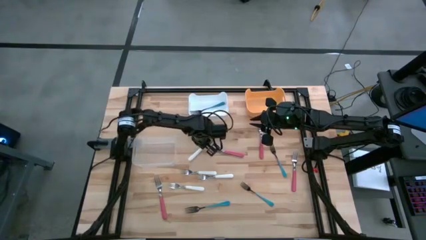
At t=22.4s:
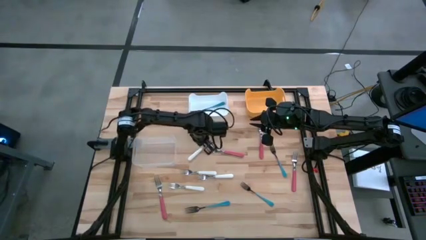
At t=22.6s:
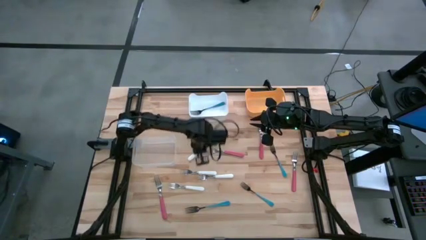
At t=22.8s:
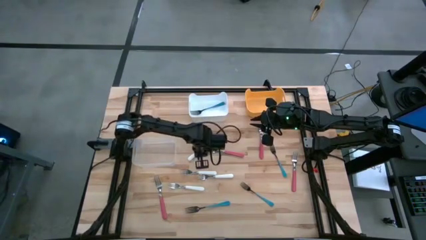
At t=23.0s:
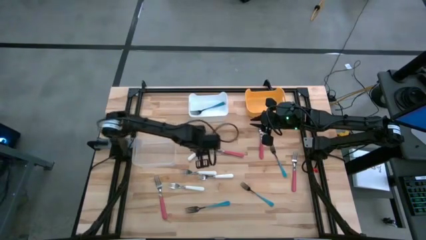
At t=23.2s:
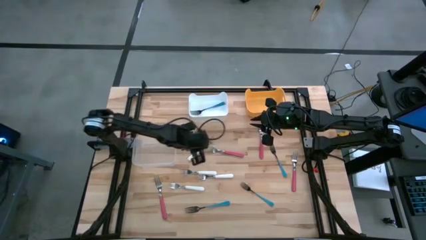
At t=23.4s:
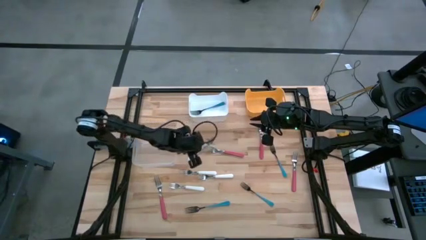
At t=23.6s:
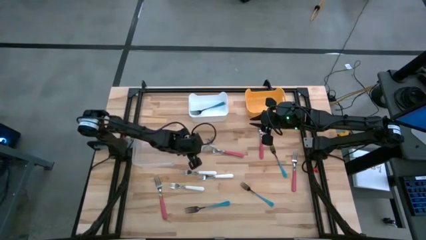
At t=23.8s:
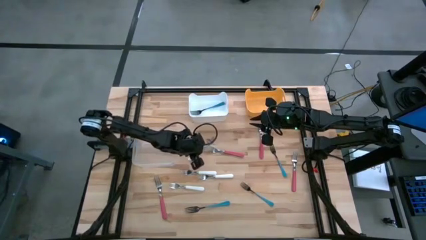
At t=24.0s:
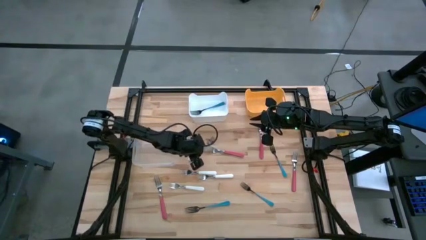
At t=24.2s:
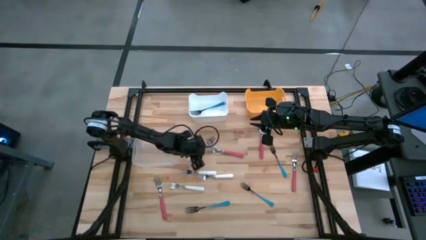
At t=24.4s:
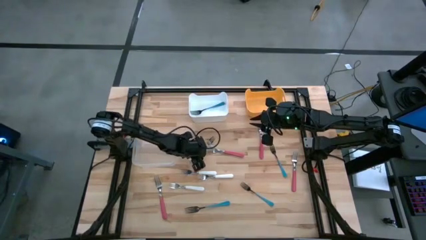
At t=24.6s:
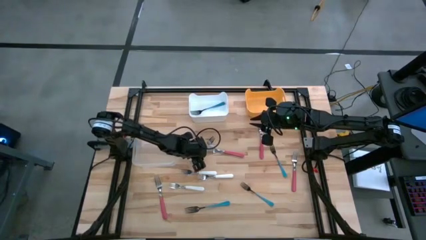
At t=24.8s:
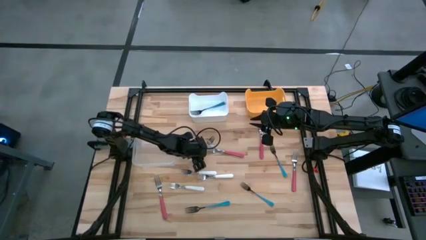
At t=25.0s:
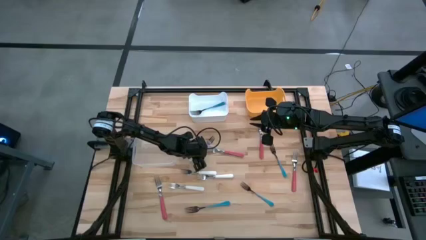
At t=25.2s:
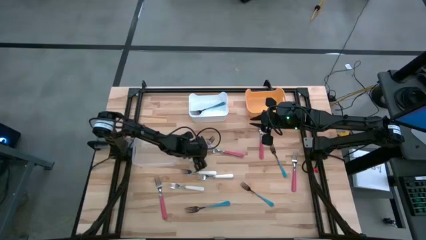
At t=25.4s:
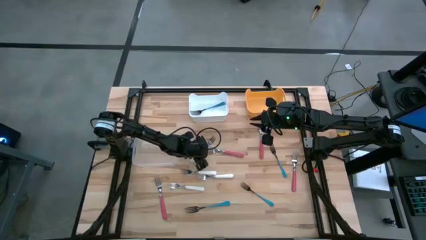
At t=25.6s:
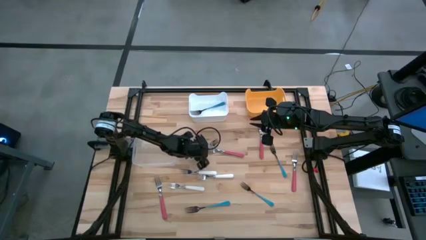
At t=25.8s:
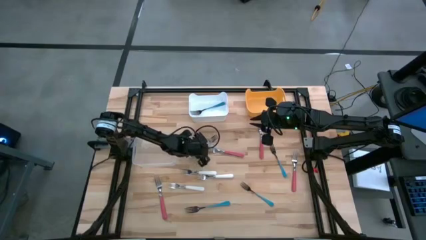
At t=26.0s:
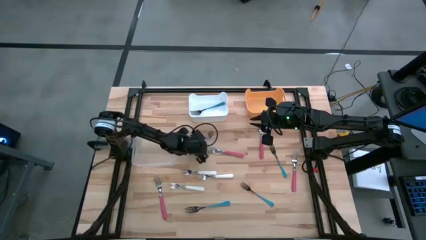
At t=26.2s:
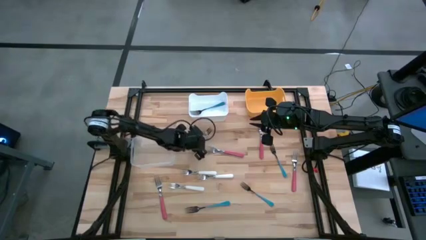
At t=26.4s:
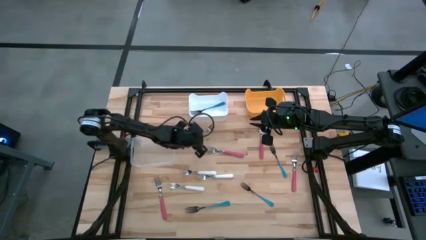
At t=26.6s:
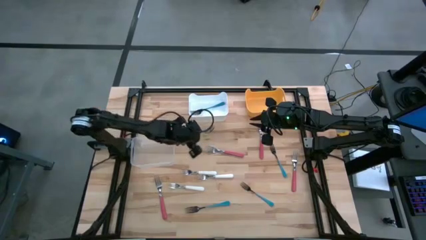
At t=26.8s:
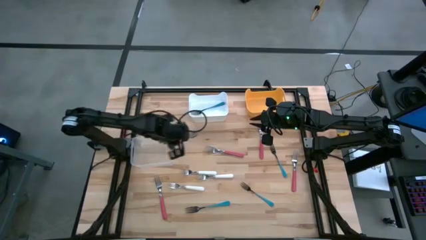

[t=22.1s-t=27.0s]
Task: Sort silverware by color (type)
Put the white fork into the transparent bin

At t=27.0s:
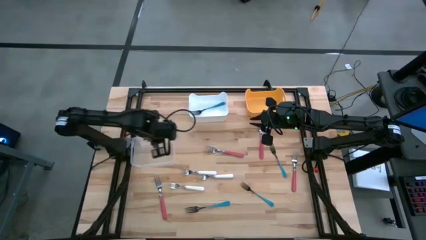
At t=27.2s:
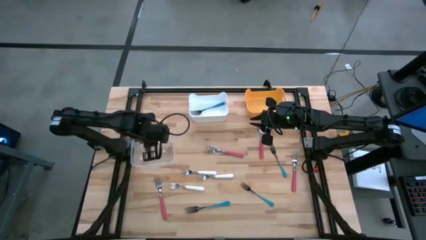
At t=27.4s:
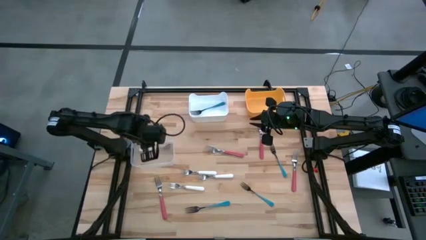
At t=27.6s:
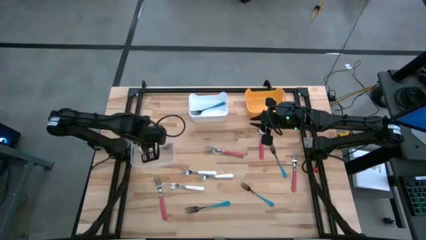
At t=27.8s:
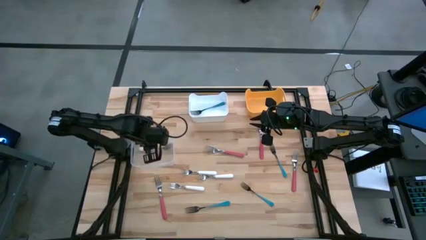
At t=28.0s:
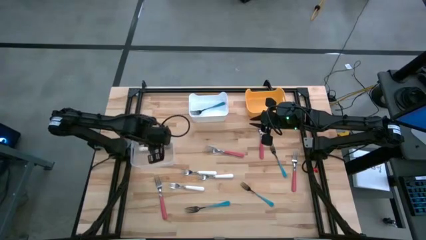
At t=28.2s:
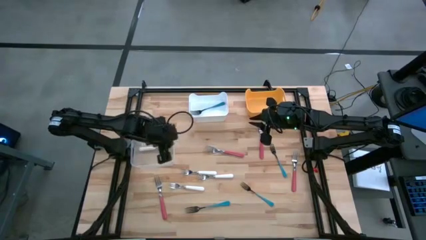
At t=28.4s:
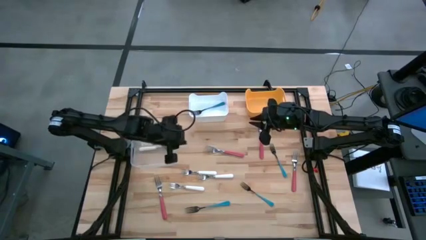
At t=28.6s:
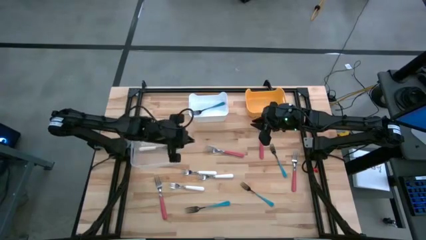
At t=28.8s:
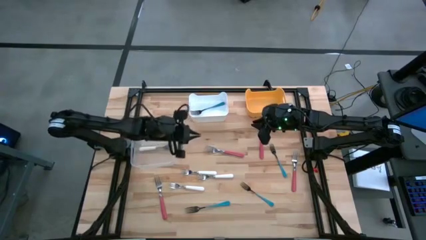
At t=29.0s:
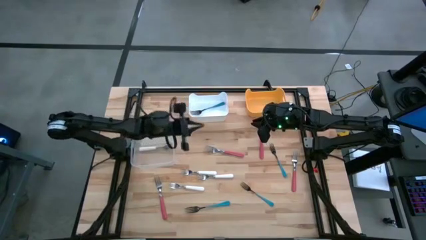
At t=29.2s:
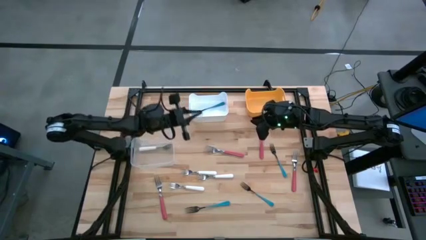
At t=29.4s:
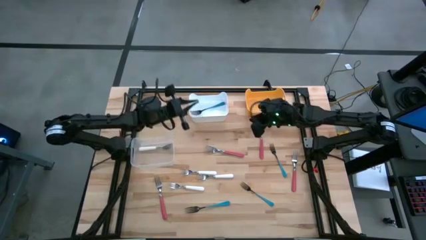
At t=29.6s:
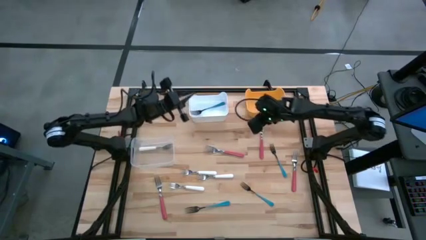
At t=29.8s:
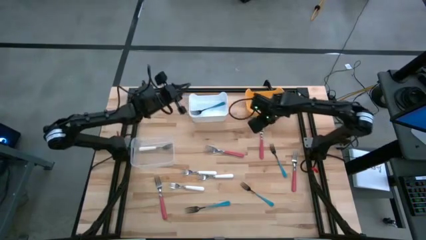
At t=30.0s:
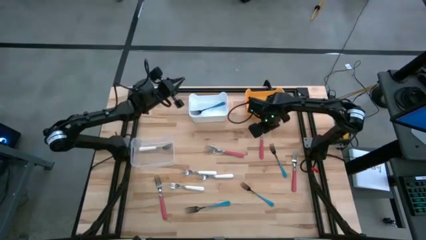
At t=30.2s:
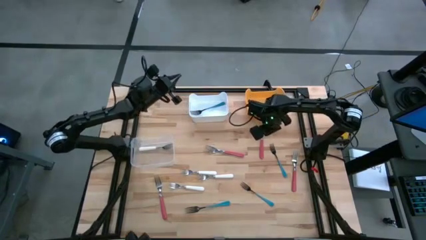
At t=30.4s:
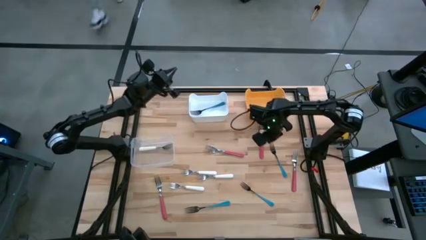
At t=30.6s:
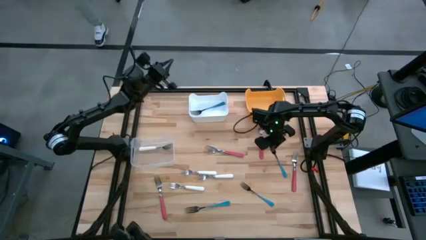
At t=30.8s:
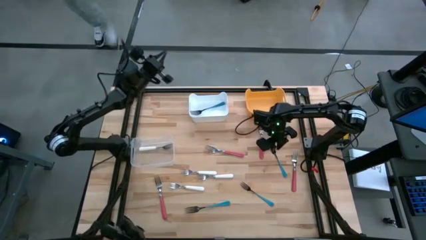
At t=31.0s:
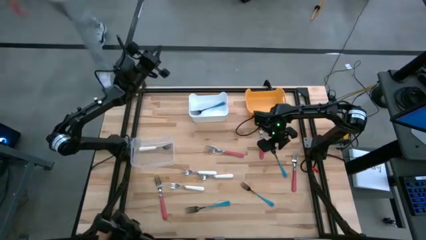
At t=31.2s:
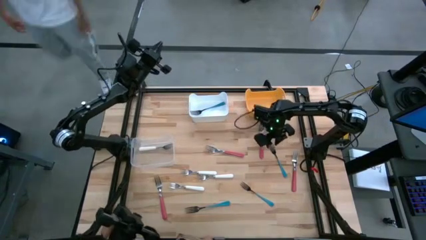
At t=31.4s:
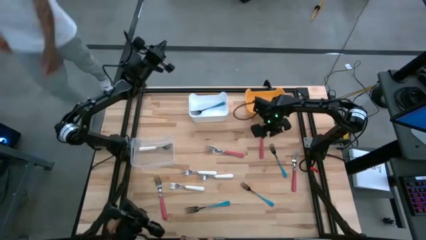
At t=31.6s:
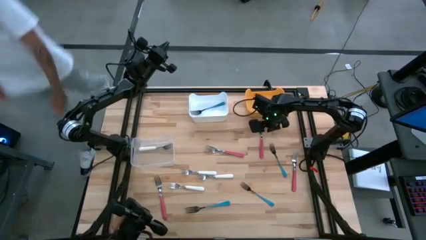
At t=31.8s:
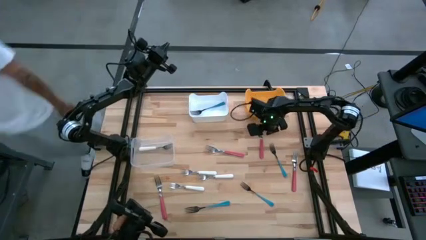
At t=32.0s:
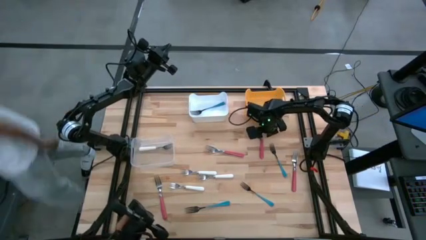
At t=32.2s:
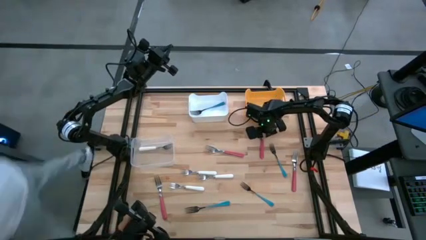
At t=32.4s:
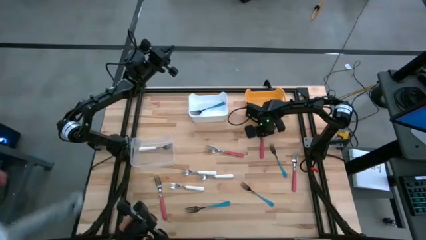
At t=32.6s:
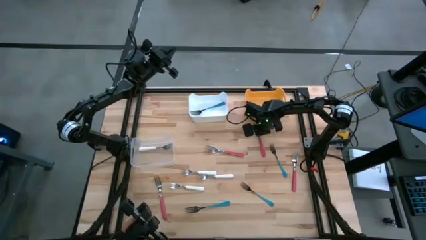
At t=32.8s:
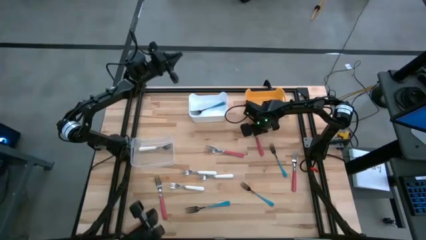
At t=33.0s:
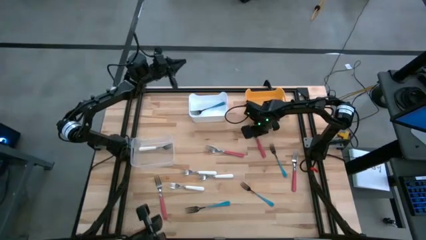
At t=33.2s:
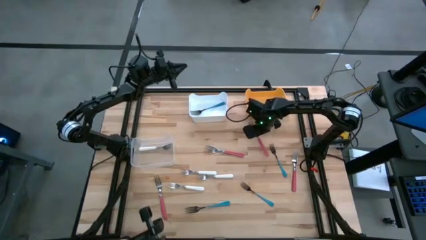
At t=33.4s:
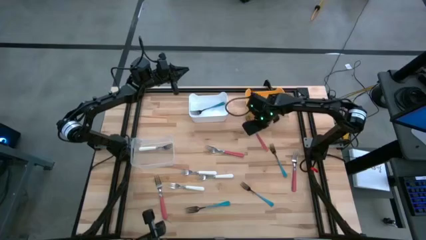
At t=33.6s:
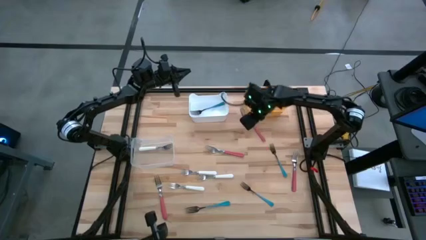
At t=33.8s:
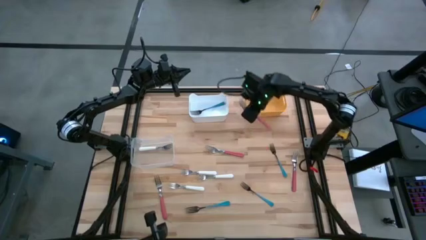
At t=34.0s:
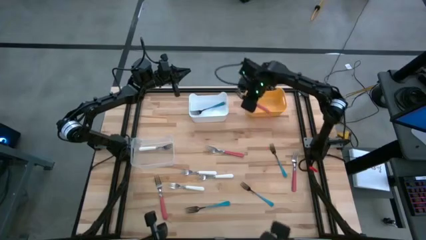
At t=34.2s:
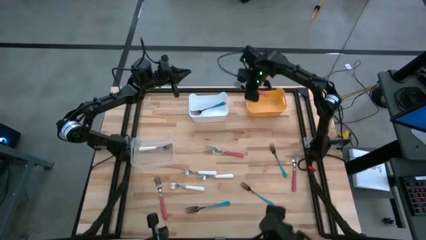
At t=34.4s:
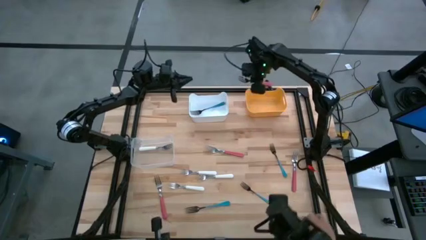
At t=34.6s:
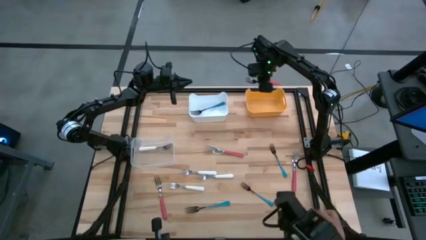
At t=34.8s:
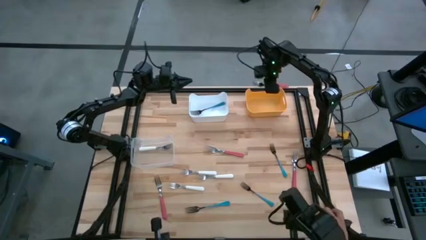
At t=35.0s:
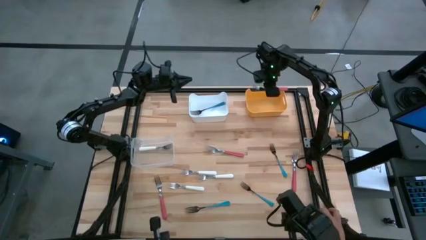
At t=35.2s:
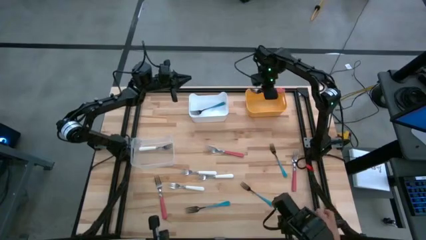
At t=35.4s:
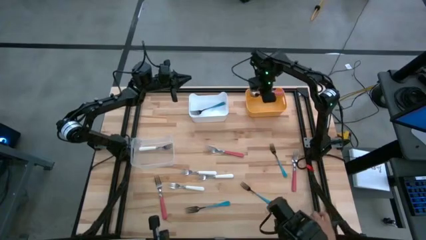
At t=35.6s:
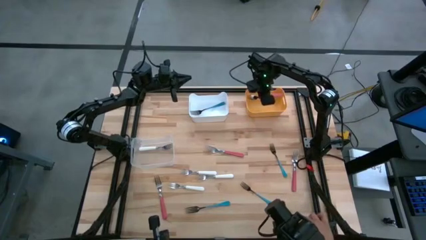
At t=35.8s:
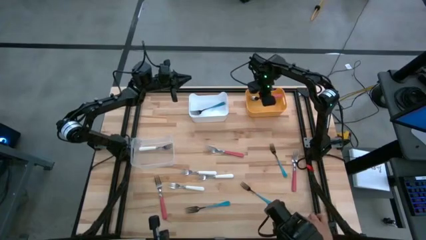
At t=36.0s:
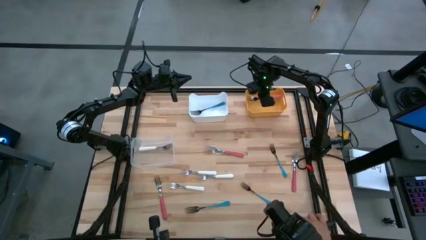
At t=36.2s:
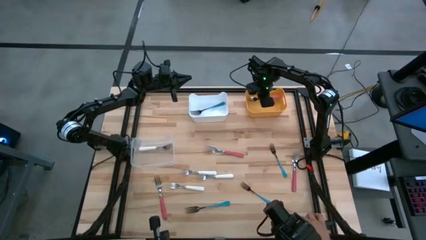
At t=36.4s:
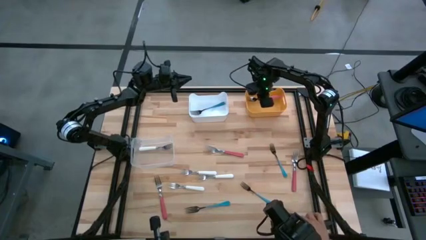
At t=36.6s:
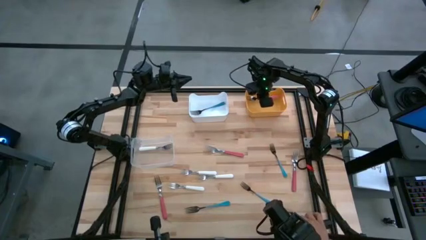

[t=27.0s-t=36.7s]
Put the pink fork into the yellow bin

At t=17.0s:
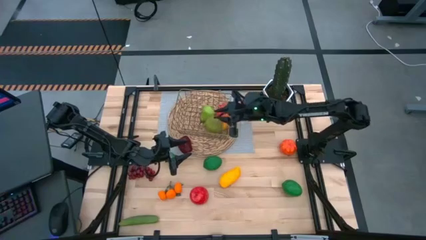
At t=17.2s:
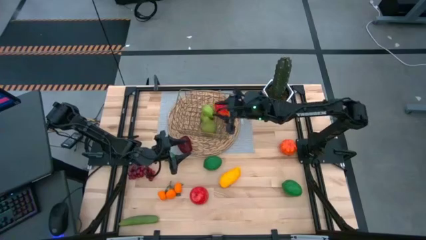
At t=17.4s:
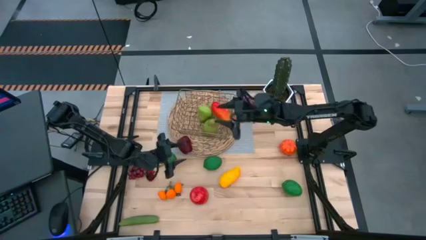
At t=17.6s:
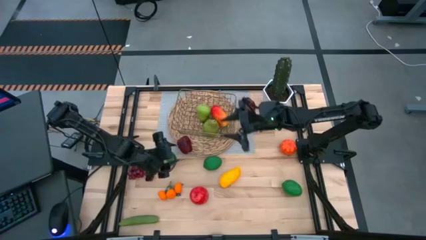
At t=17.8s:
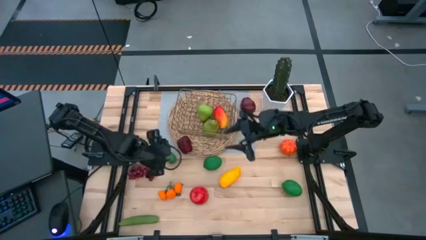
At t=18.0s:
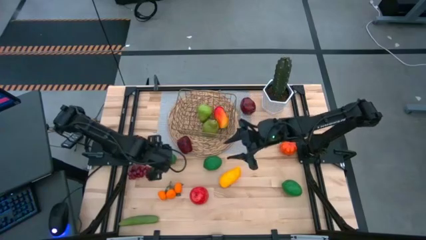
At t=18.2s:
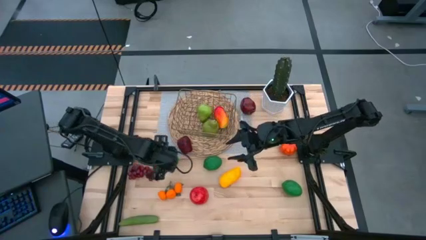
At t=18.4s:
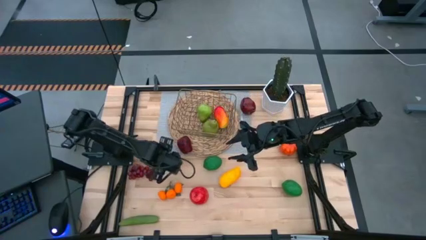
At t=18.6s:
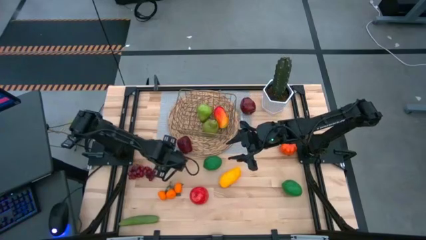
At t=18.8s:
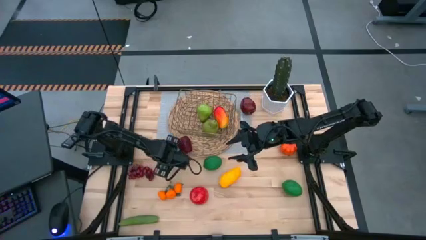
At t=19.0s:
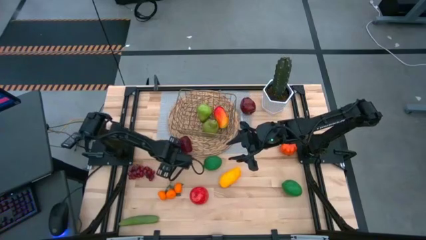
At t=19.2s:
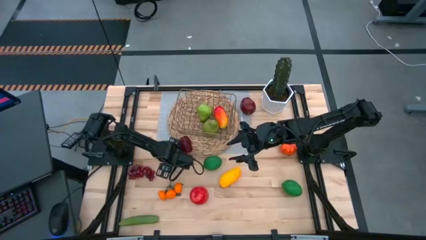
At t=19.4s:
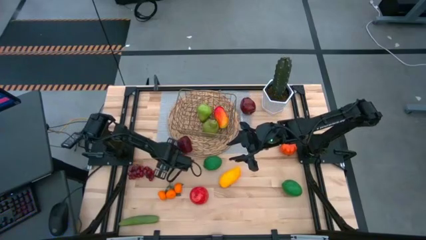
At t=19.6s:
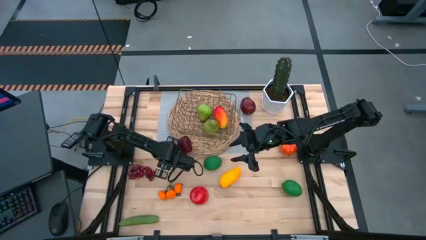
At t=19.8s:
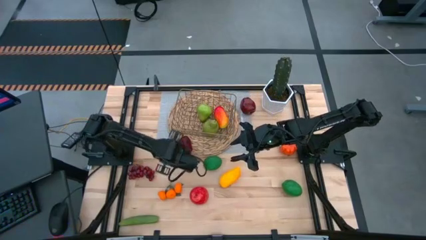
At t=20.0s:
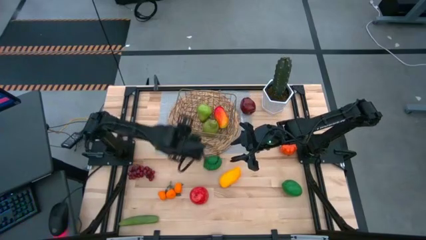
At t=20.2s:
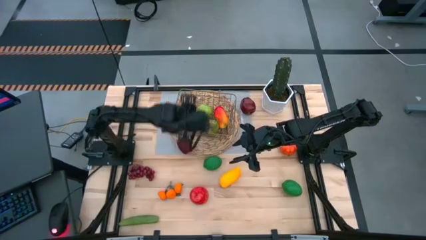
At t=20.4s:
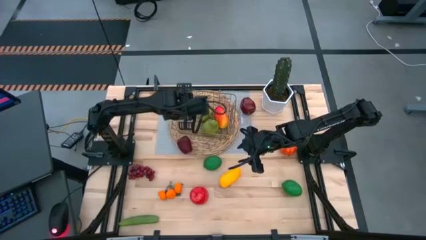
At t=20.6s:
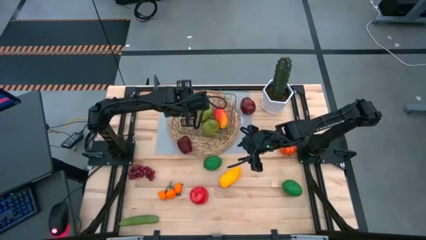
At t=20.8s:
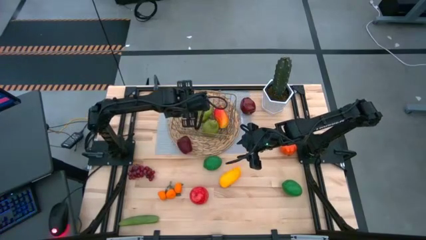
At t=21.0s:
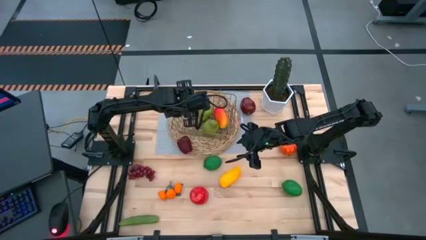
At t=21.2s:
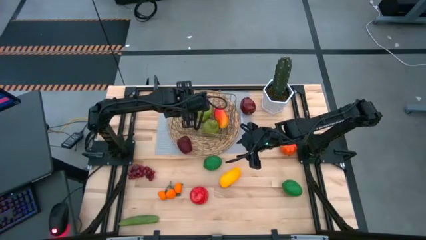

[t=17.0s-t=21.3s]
Task: Build produce basket
Put the top left green lime into the gold wire basket
